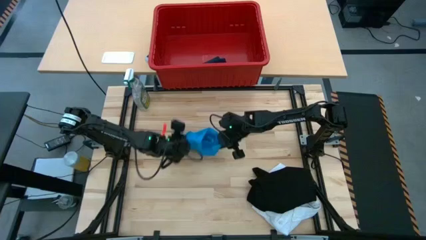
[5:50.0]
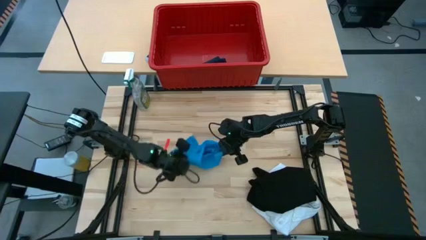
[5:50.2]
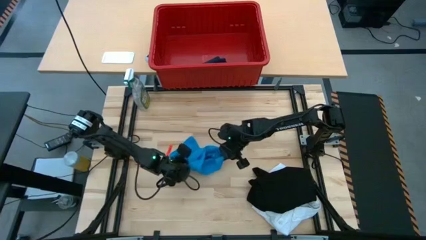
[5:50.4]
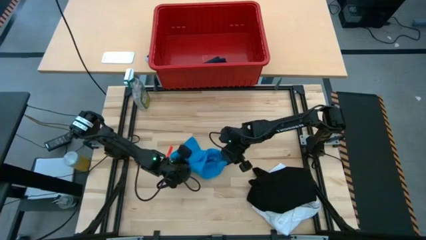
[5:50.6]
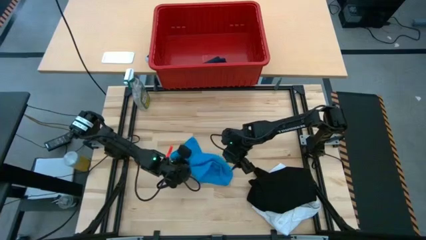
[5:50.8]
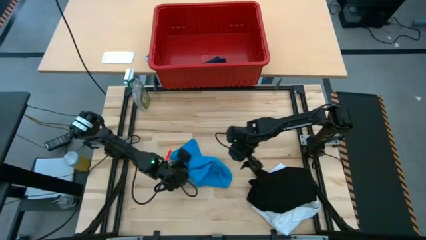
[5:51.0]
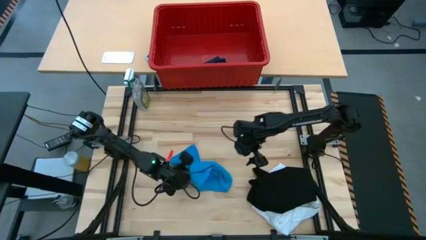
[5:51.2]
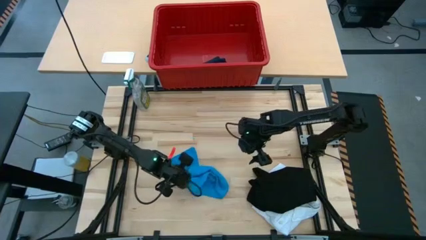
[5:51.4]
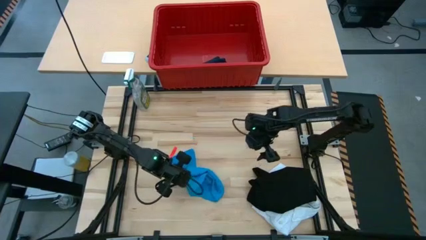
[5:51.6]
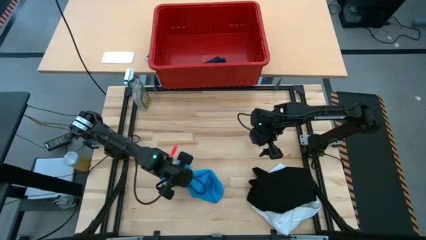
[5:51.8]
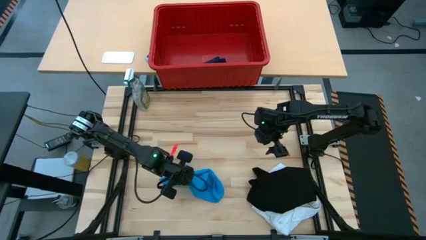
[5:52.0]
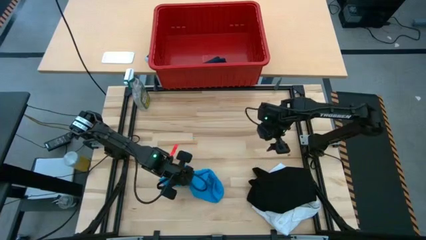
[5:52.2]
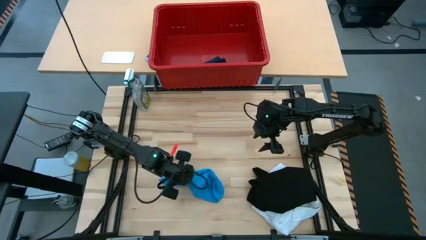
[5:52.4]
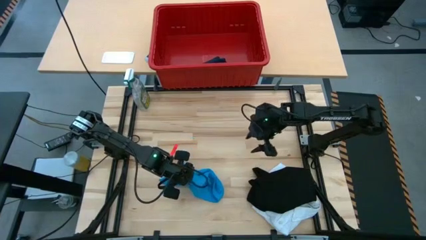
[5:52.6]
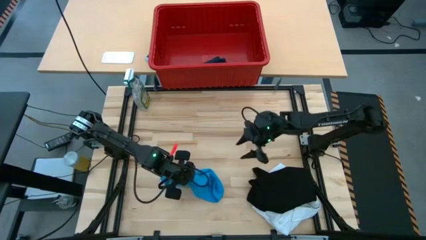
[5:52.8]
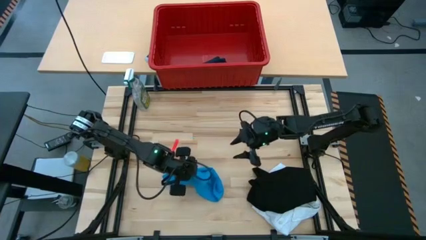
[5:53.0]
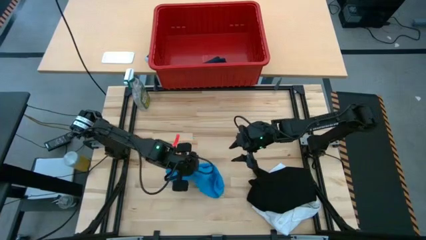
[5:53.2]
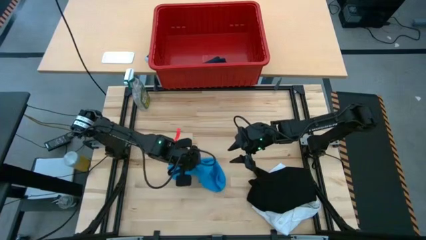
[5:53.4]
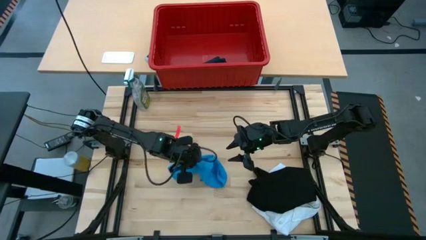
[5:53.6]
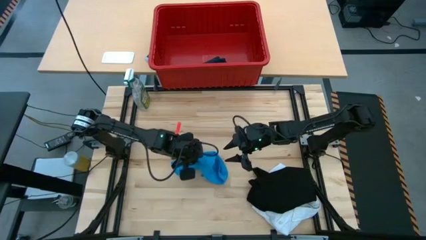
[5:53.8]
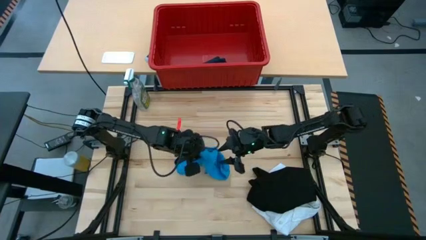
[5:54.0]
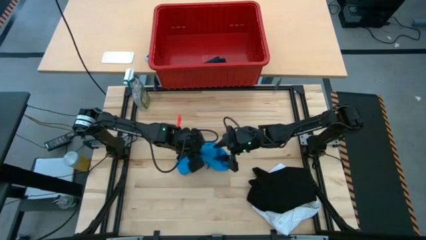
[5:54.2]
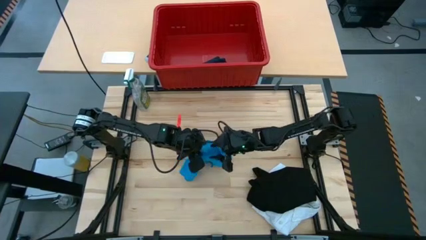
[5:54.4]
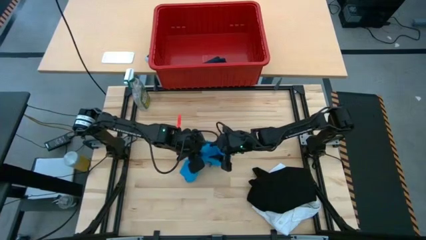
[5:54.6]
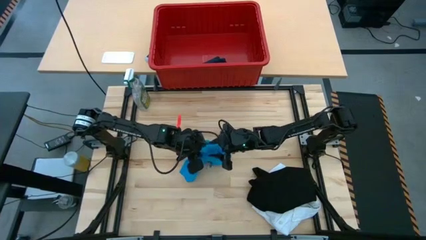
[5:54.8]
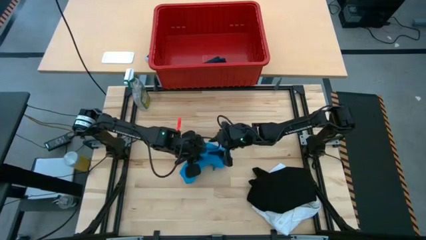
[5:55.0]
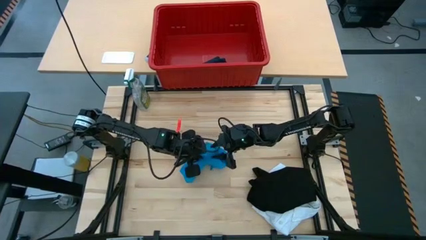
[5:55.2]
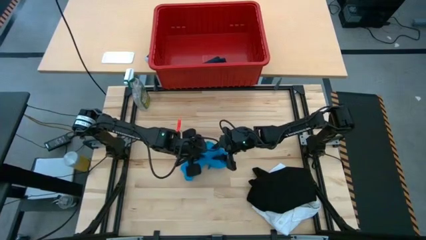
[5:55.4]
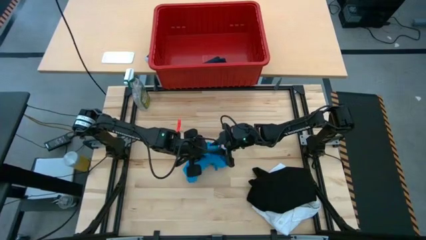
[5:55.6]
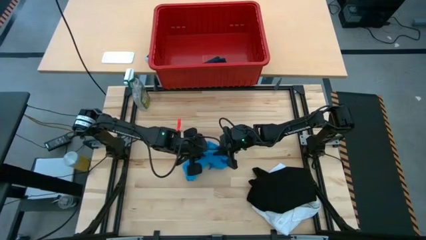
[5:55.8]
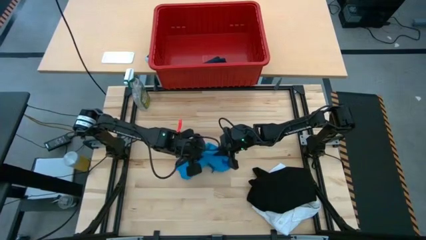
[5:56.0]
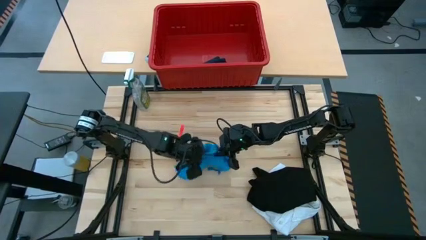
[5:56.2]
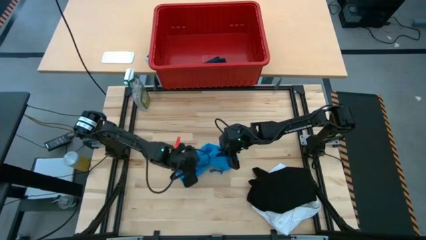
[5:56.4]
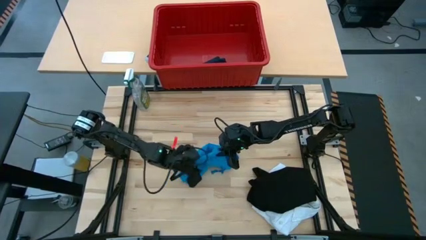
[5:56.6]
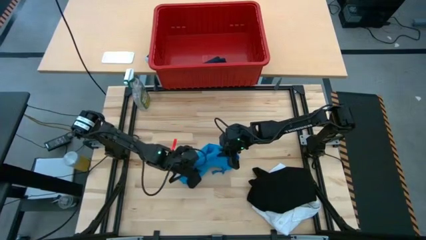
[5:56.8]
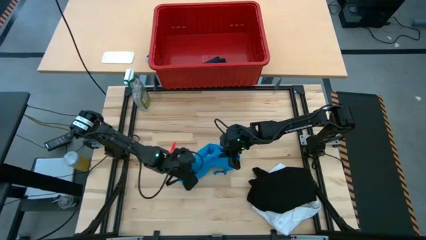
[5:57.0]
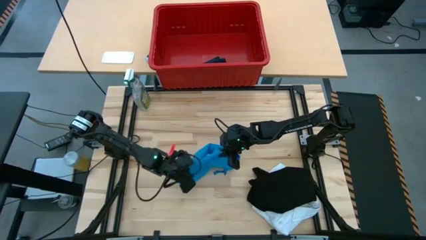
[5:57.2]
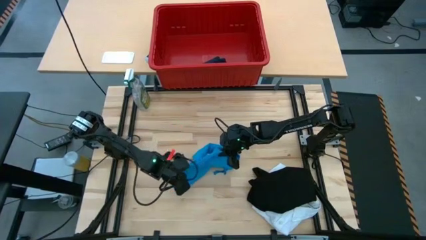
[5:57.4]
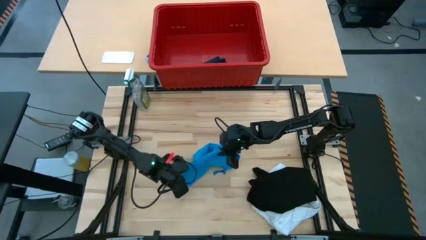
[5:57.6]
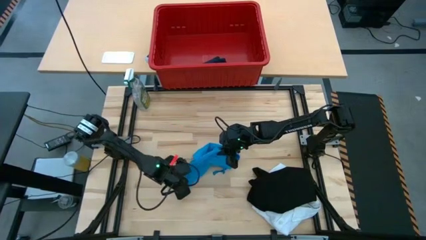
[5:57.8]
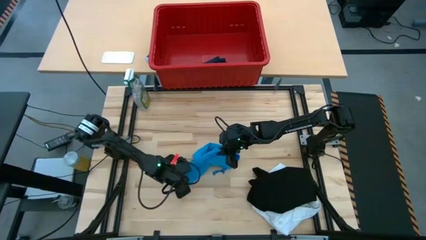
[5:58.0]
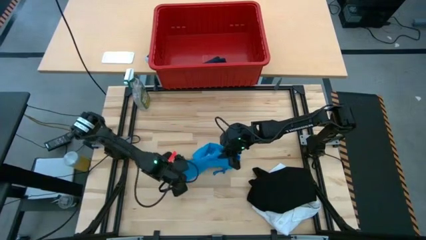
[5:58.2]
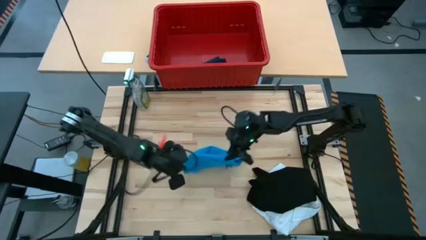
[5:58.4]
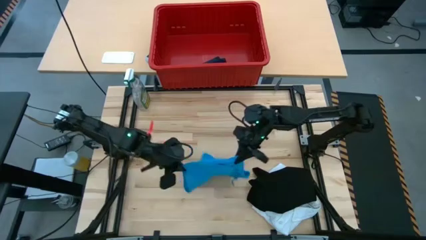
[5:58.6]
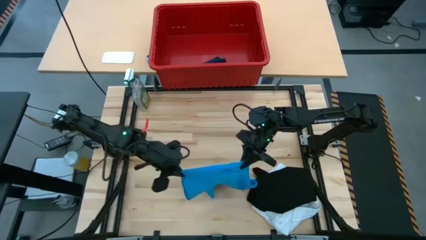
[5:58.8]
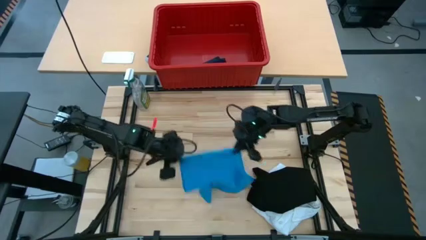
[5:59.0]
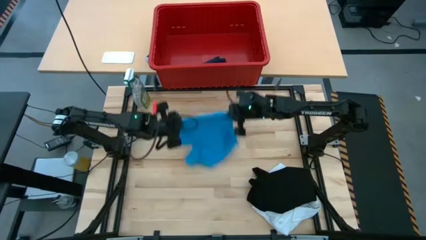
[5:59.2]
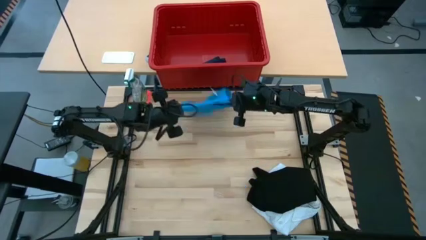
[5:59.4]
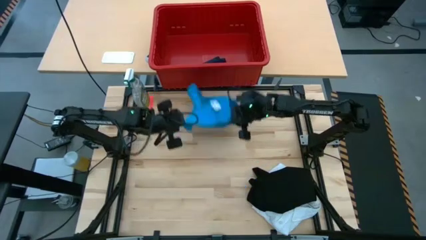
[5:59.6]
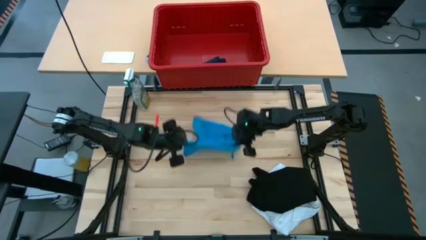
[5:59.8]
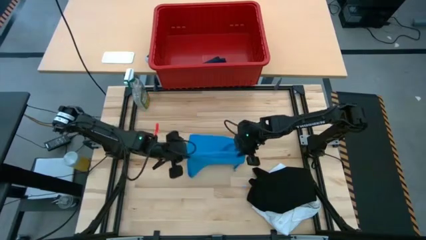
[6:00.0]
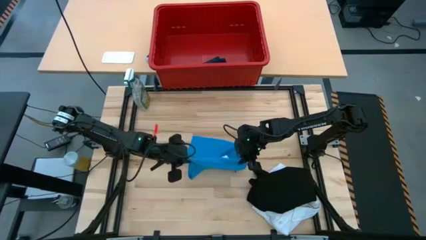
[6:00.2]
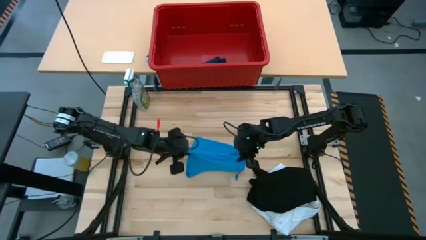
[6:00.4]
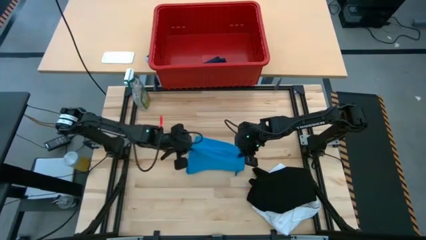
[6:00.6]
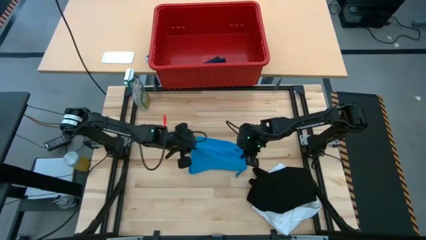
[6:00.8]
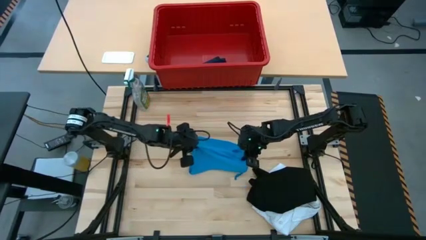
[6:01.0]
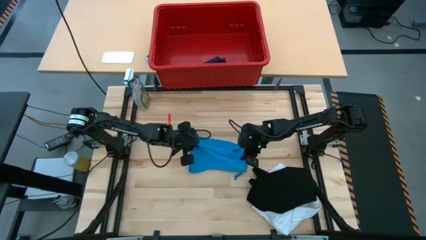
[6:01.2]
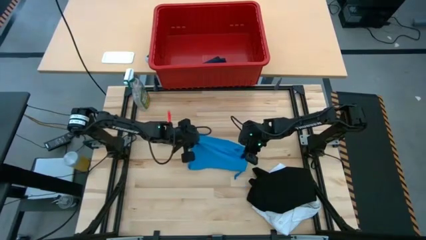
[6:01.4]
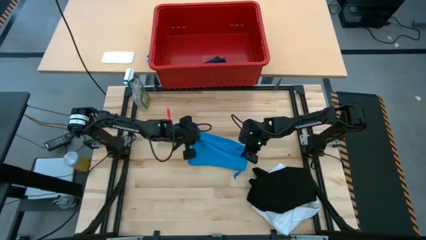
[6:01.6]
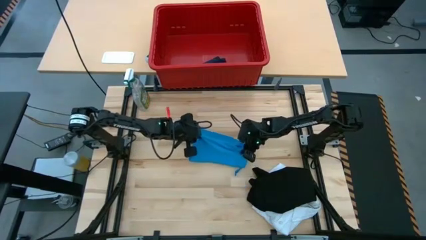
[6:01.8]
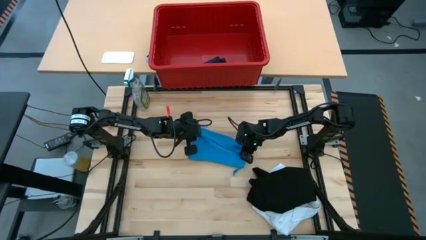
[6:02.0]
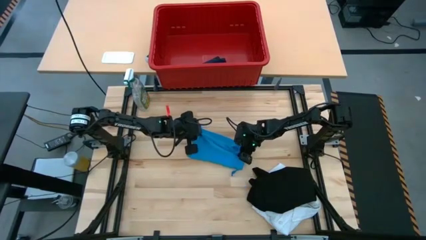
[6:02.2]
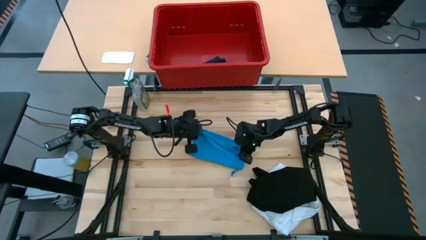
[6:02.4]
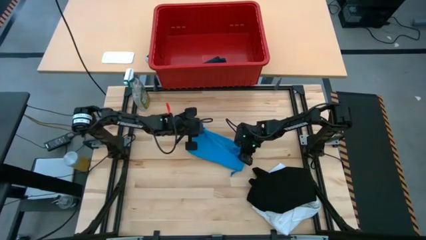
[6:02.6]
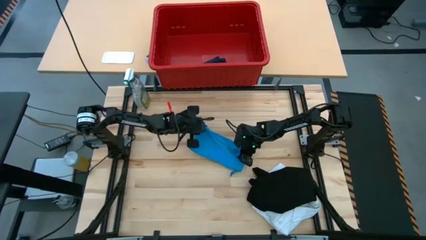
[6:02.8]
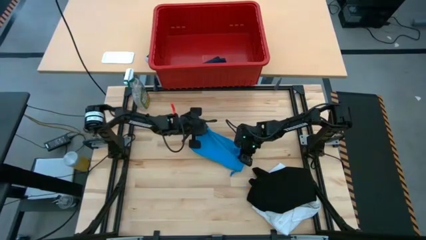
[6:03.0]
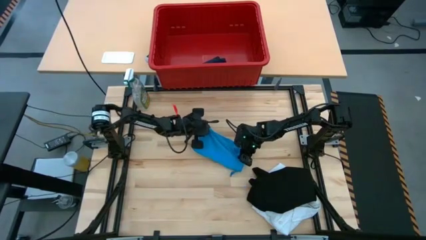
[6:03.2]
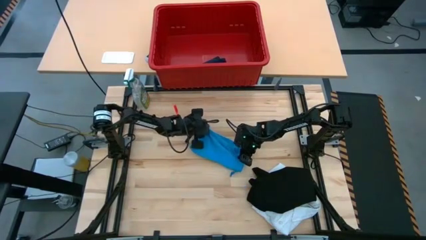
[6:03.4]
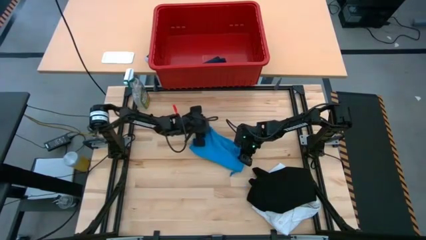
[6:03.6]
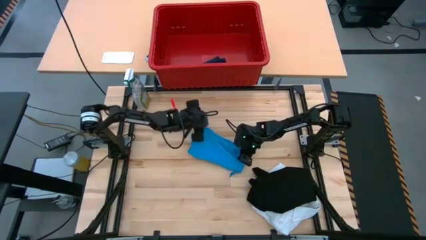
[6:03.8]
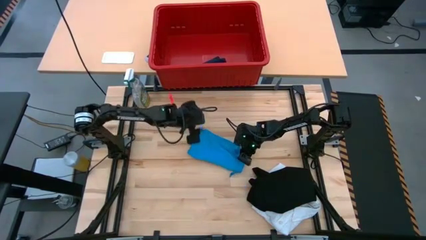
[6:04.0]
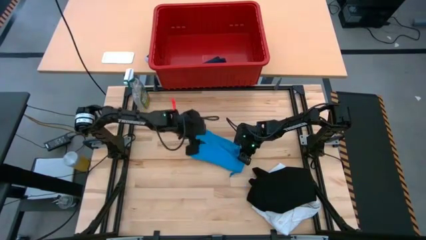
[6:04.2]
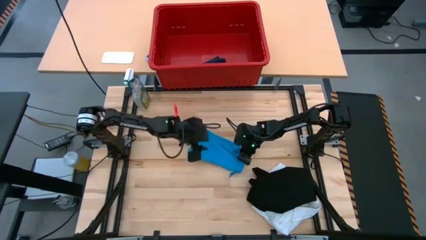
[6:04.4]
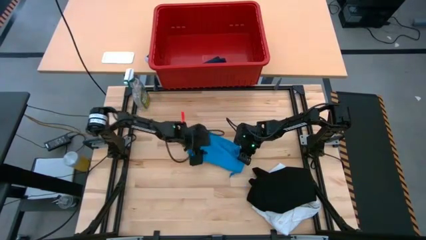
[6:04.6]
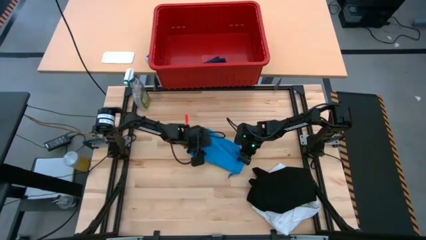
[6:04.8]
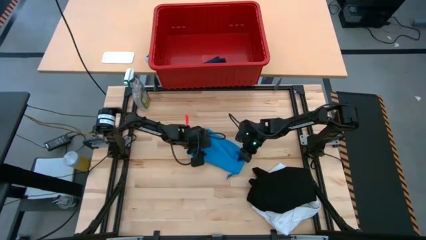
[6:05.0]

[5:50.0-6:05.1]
Task: Fold laundry
Fold the blue shorts
